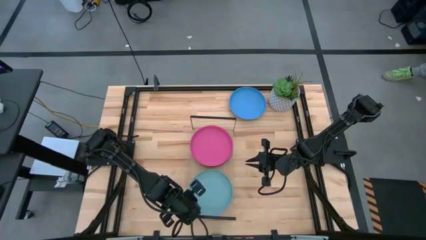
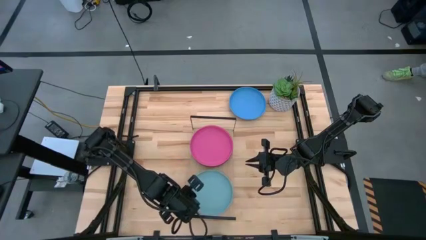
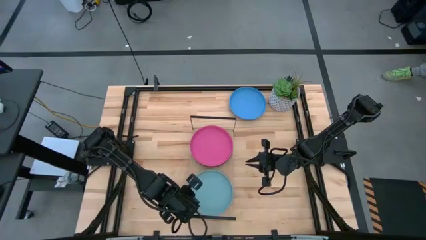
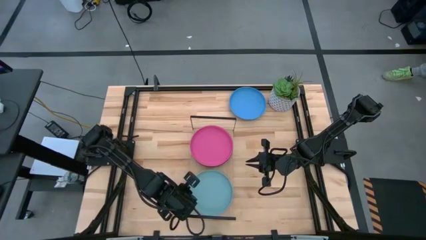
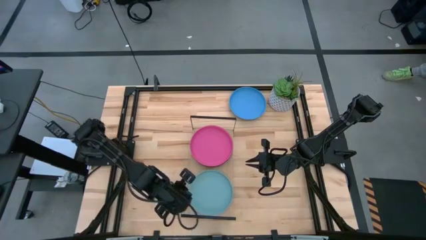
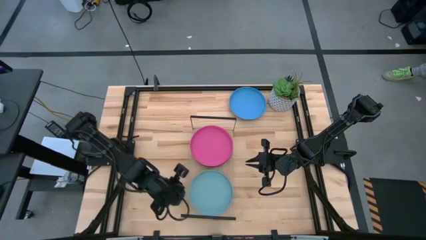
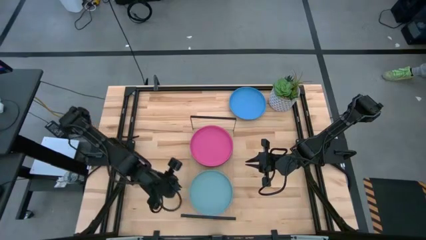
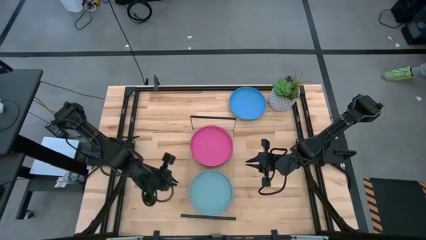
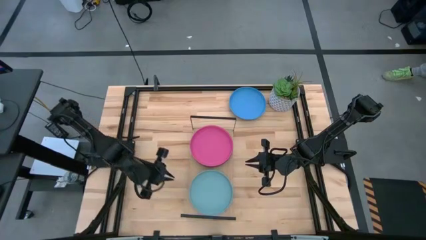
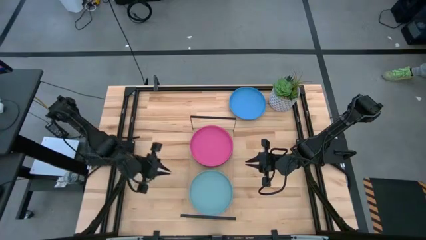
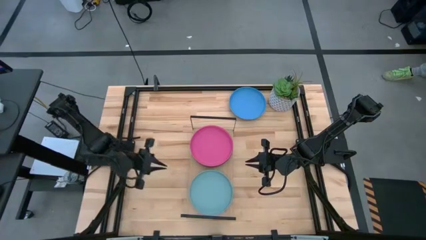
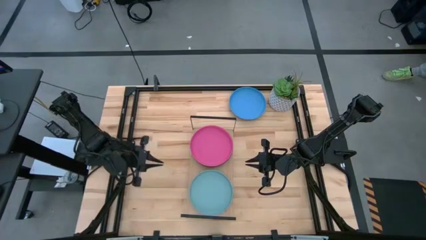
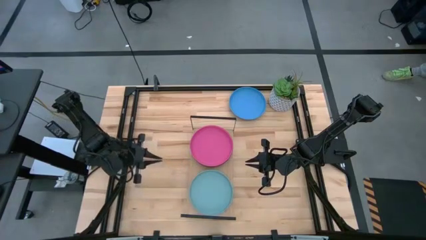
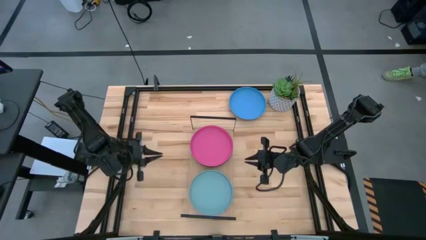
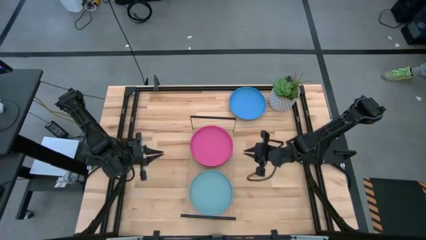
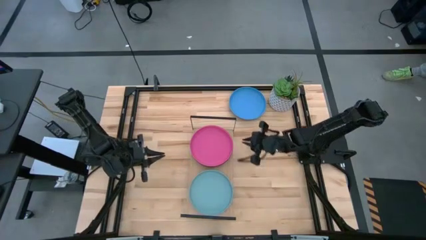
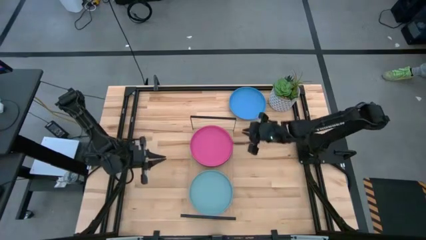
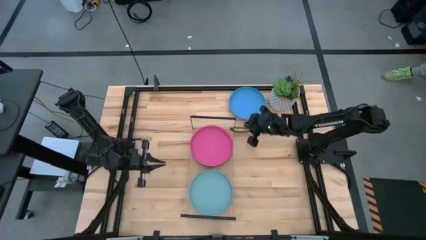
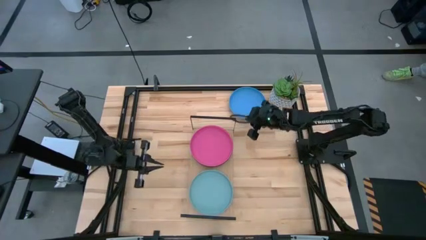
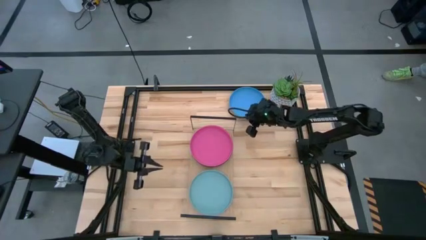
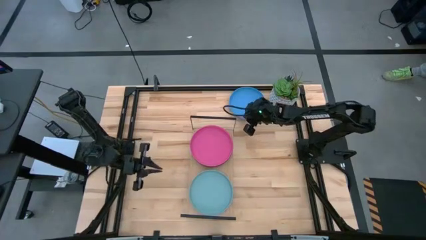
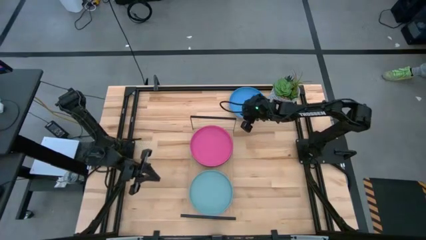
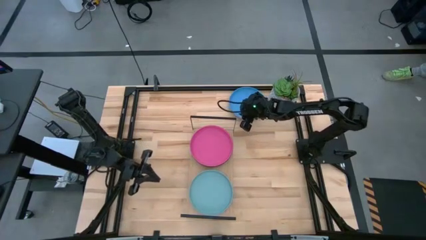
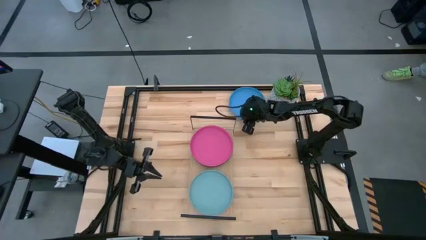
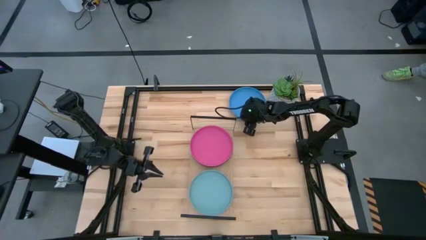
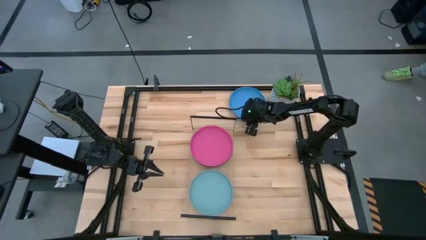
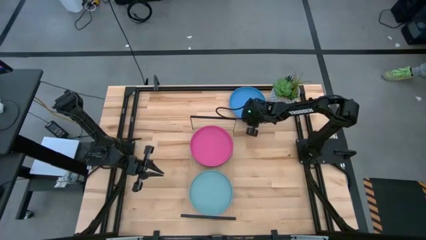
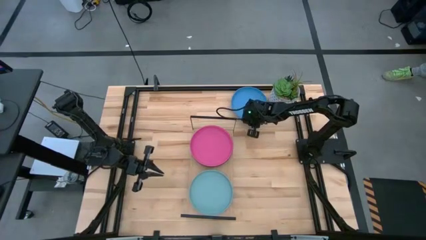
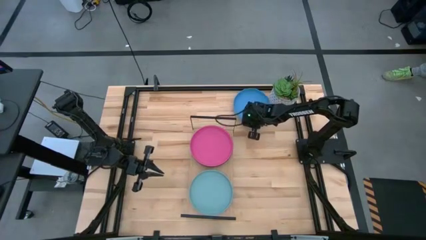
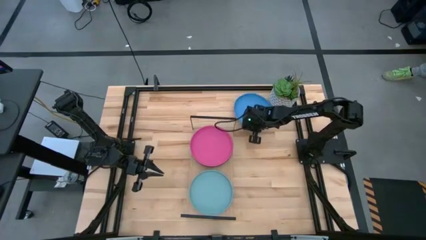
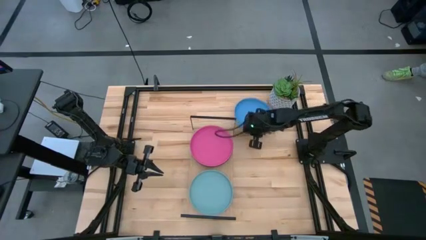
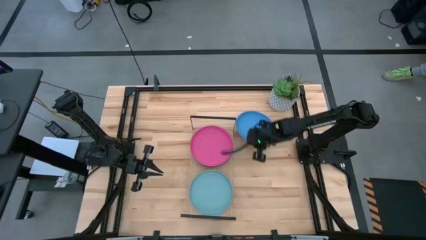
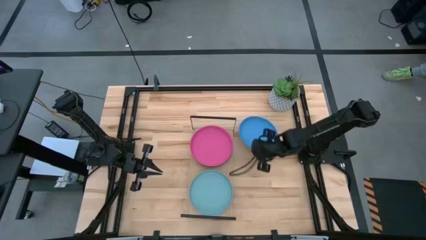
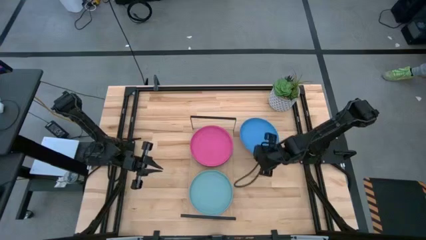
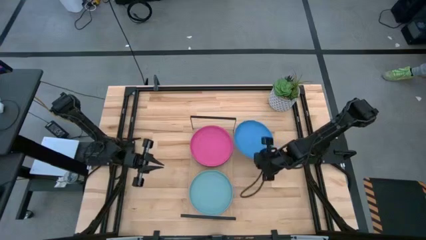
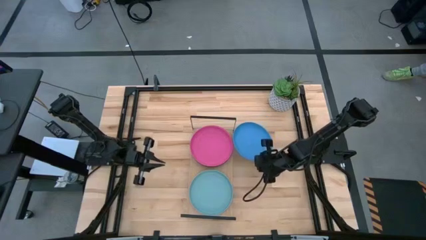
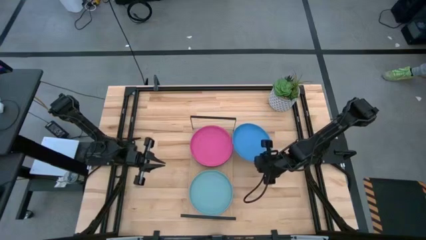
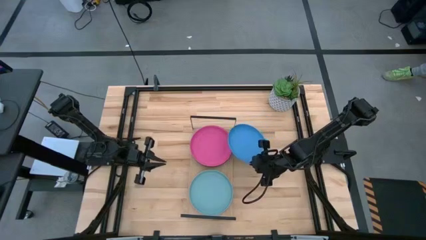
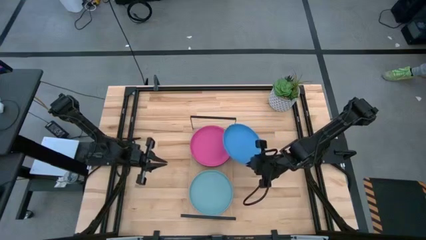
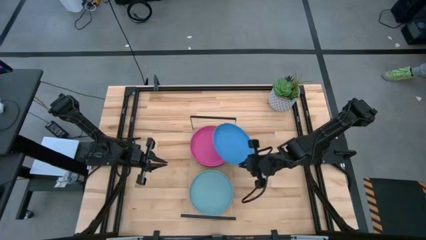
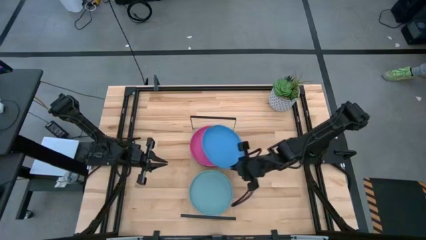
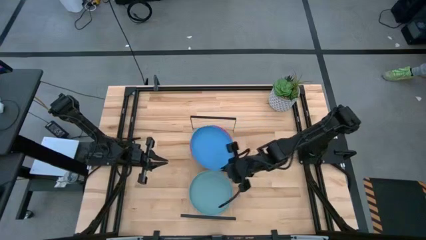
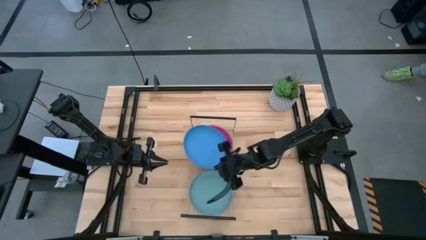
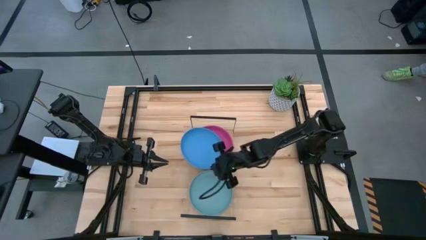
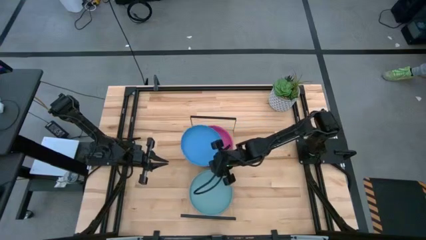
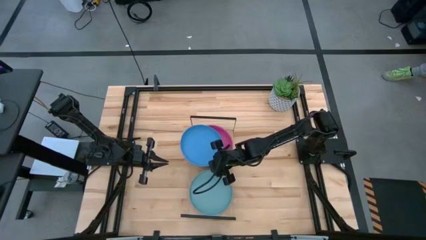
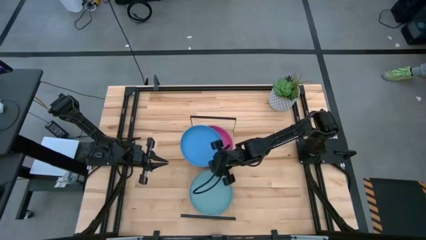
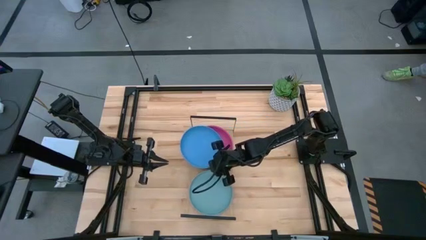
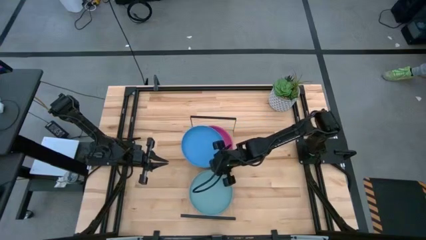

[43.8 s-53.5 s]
Task: Place and stack plates onto a shelf
Stack the blue plate on top of the pink plate on the shelf

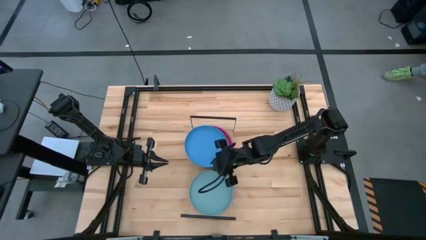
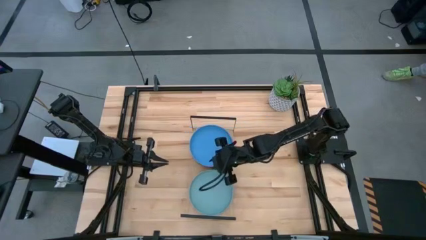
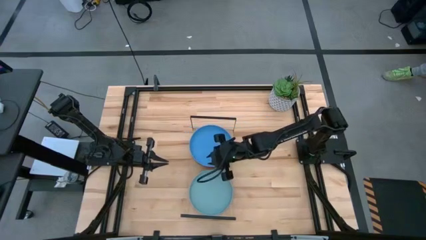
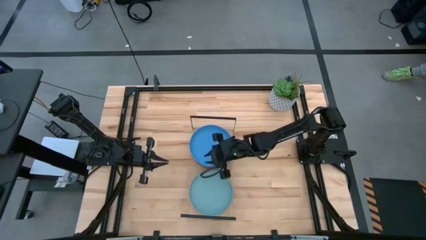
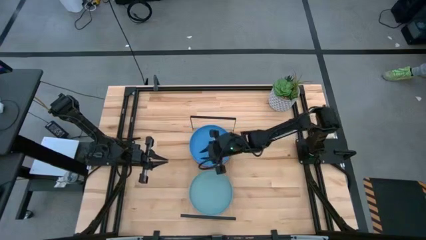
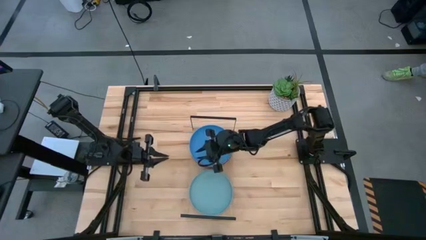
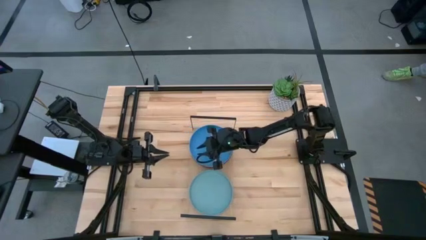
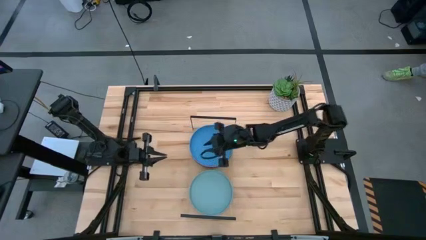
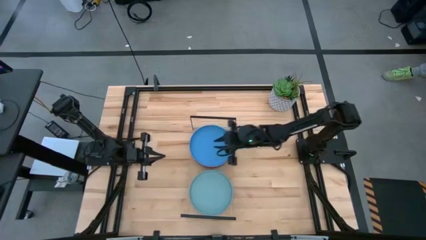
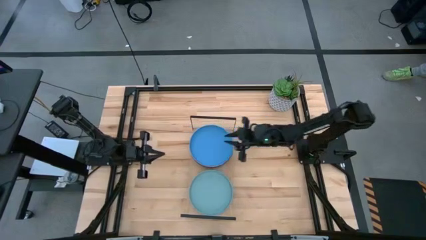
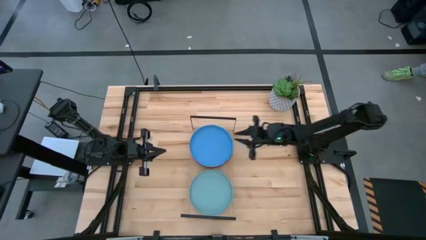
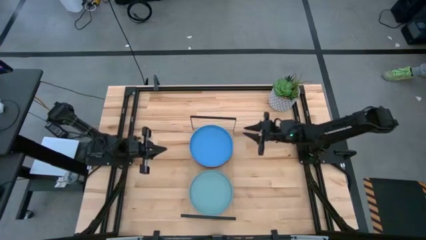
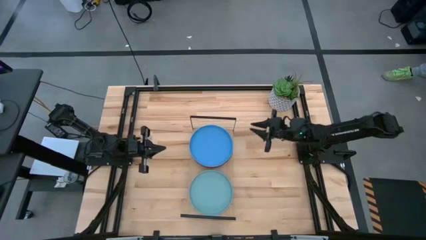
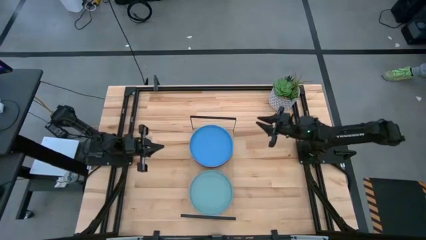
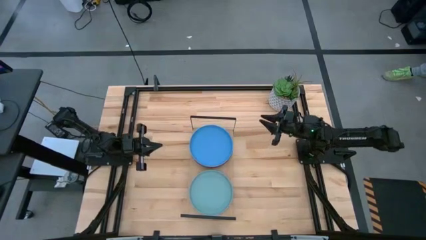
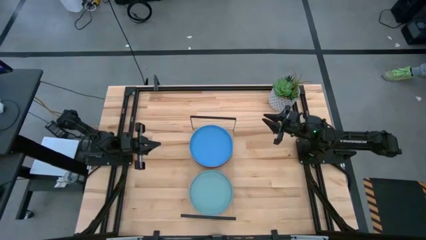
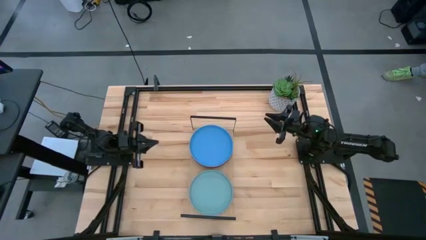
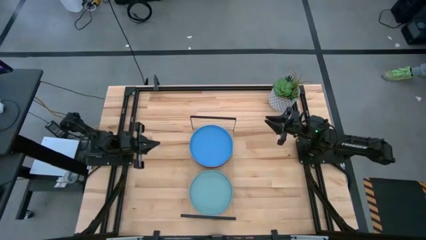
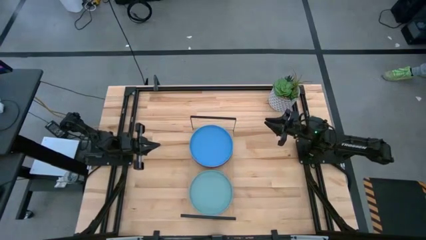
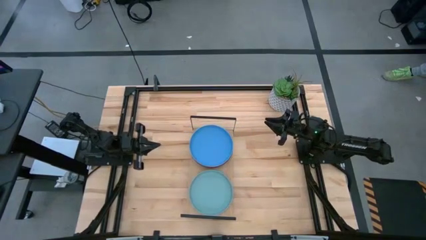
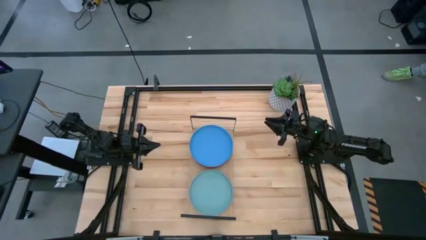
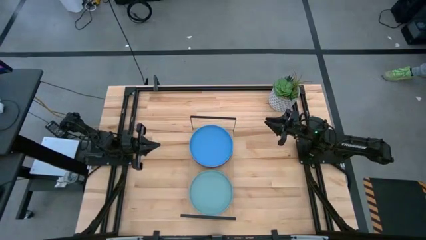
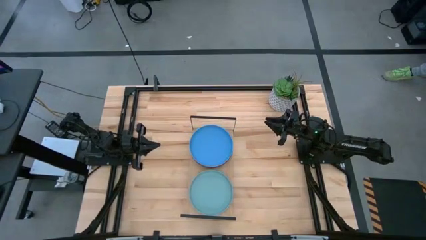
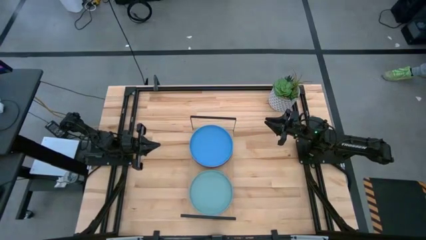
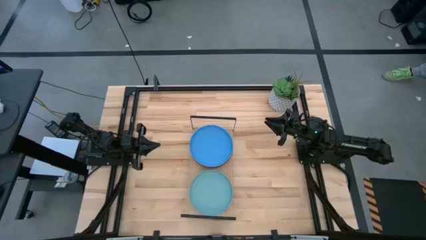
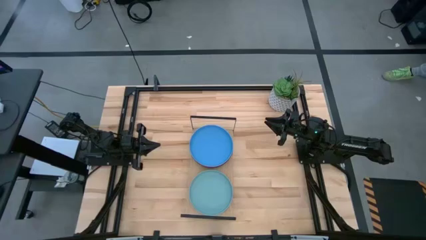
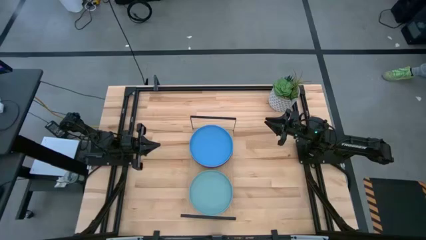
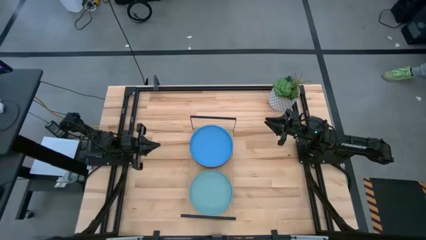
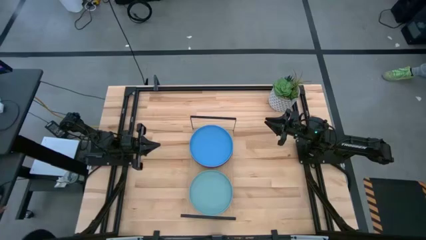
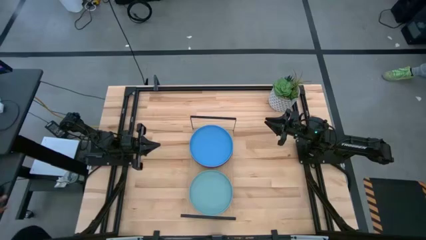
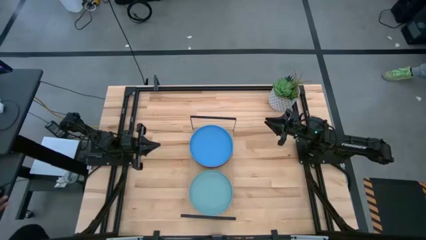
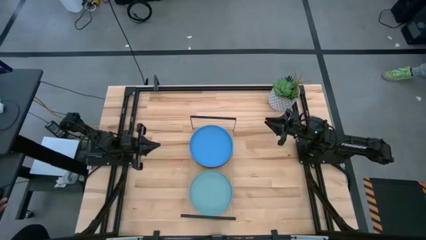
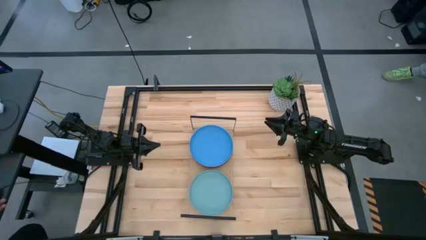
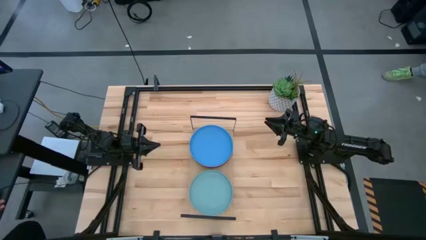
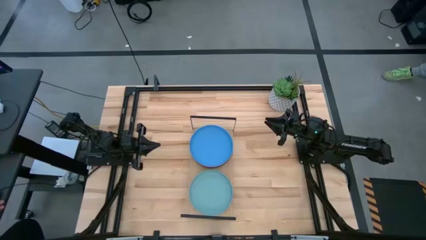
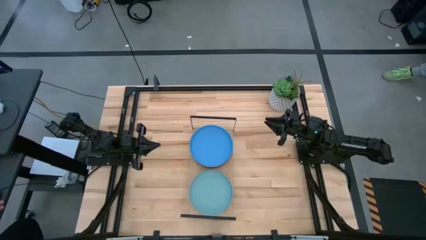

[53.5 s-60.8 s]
Return to Home Position
